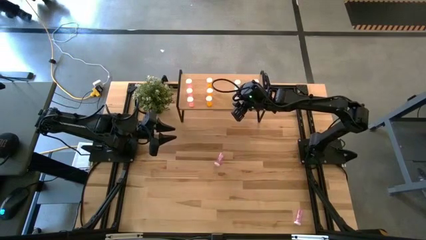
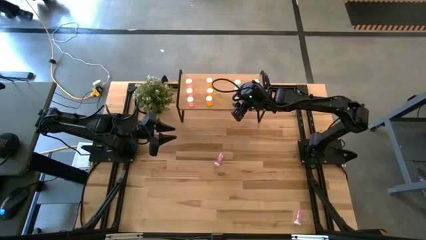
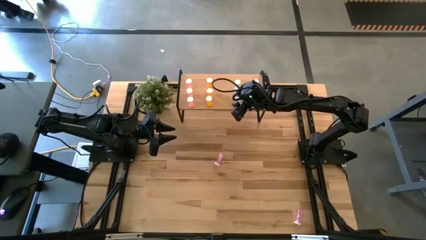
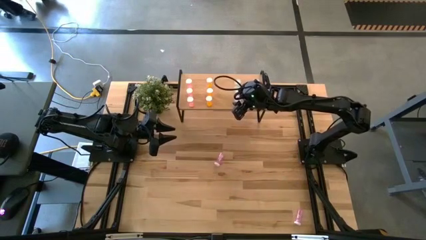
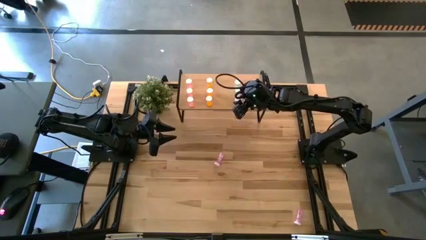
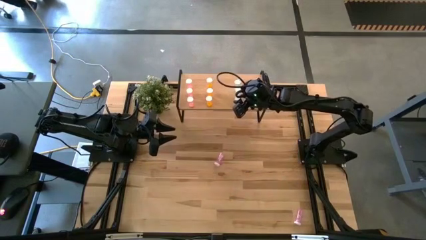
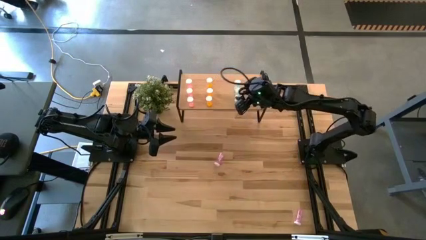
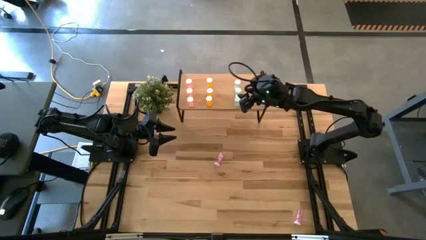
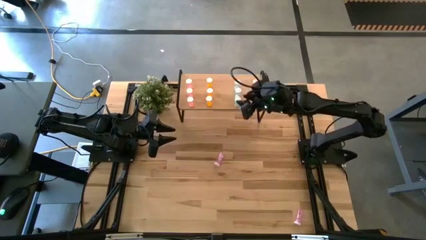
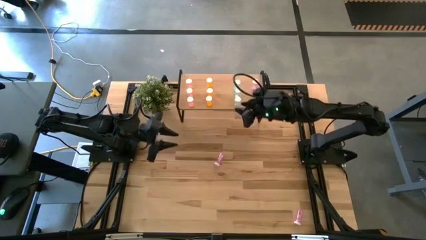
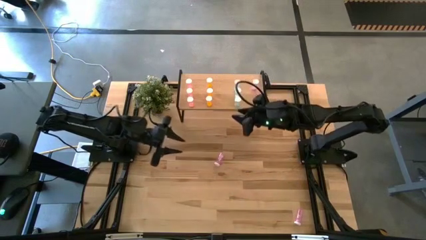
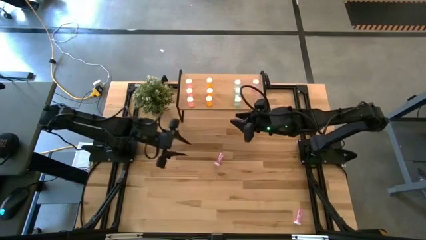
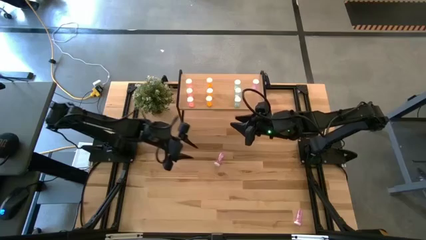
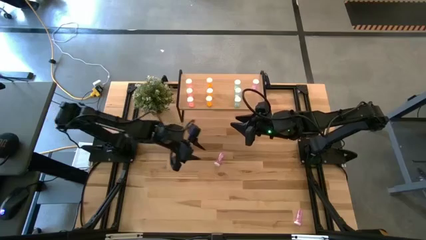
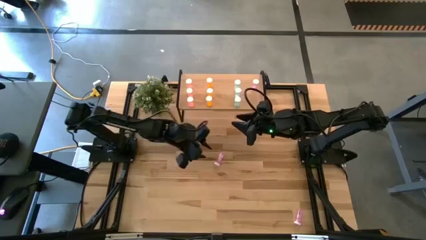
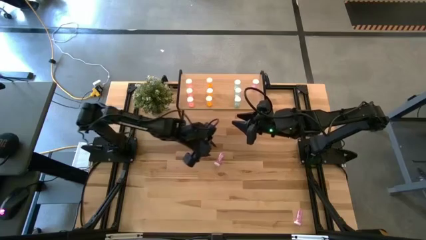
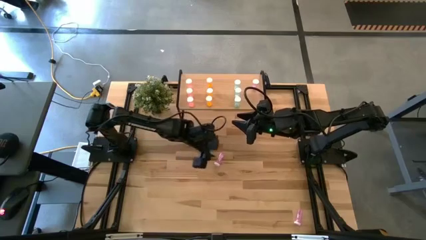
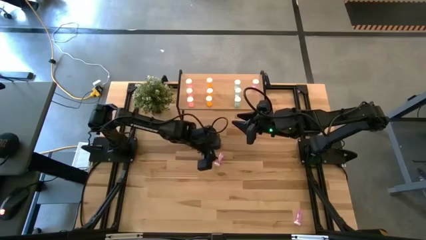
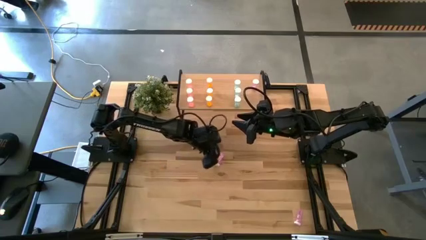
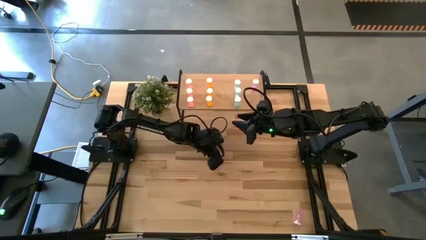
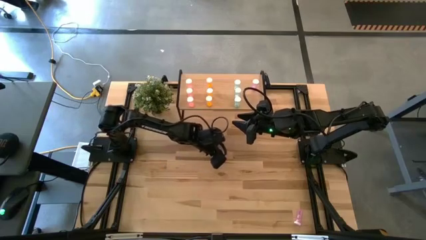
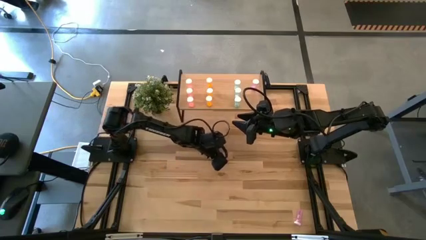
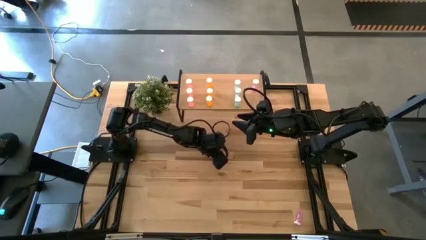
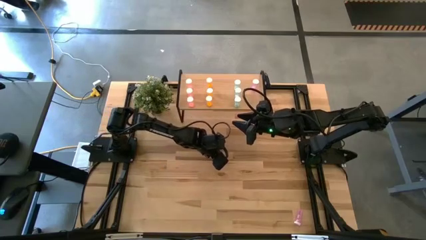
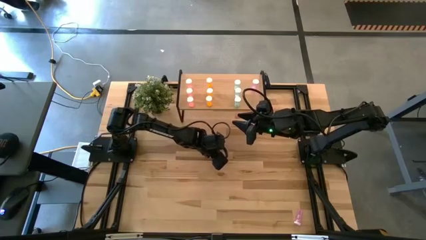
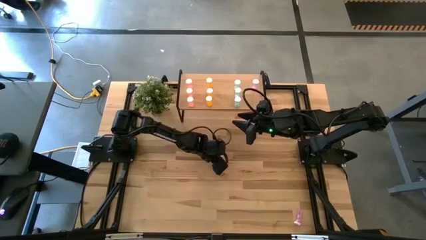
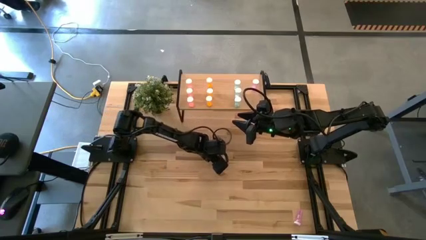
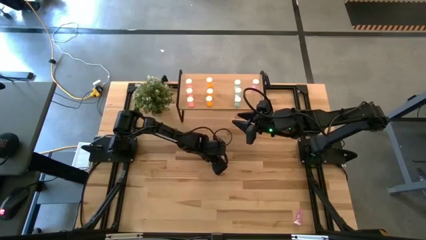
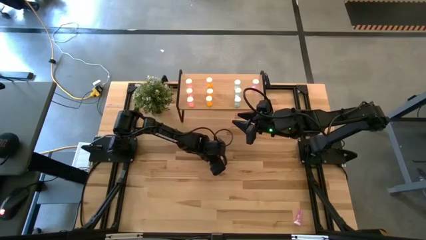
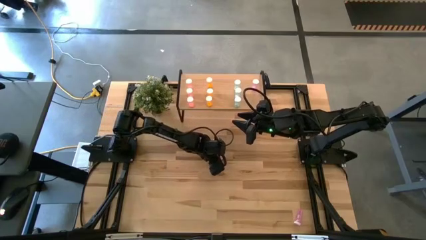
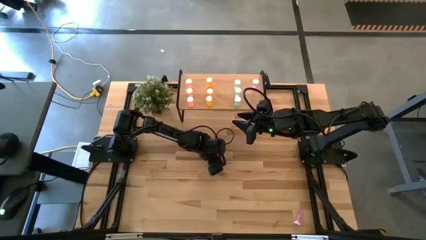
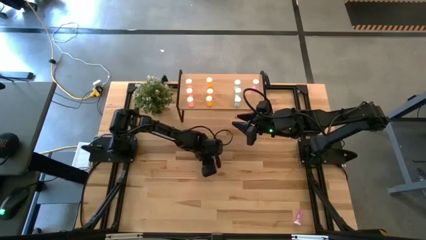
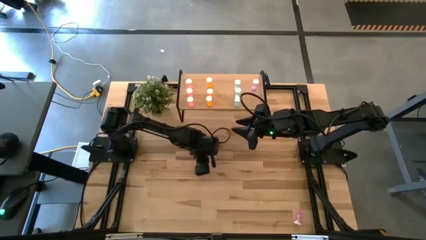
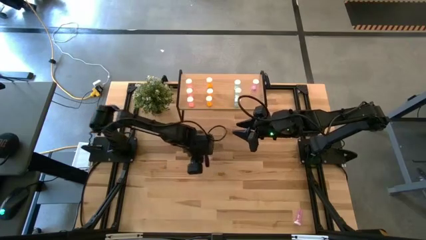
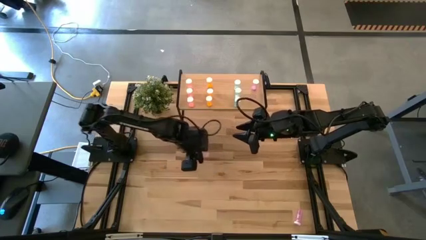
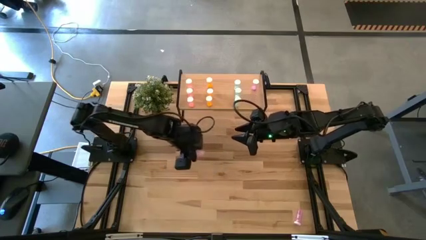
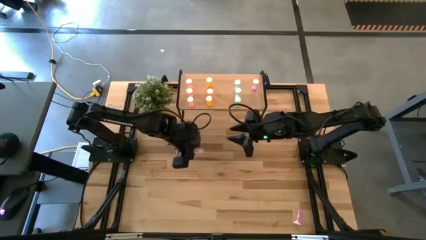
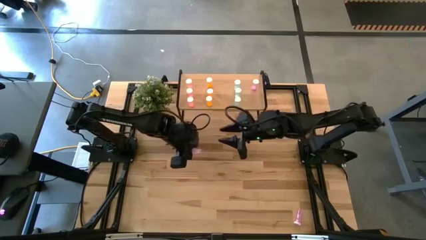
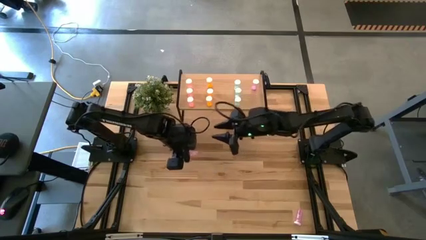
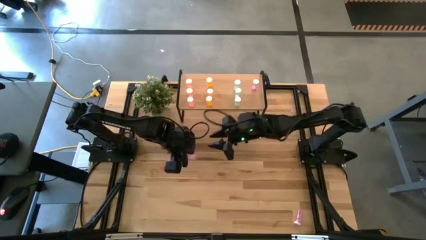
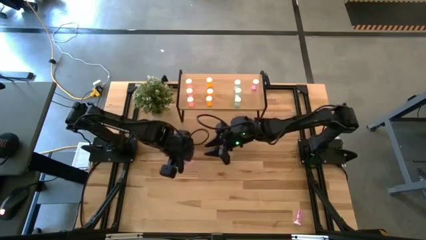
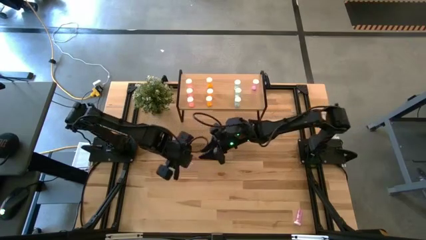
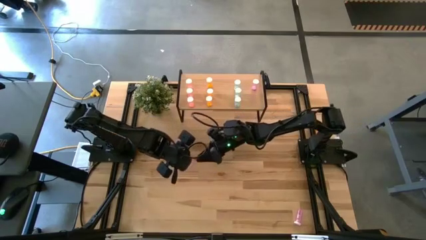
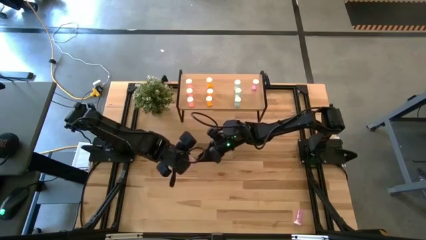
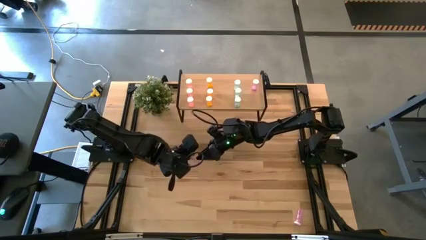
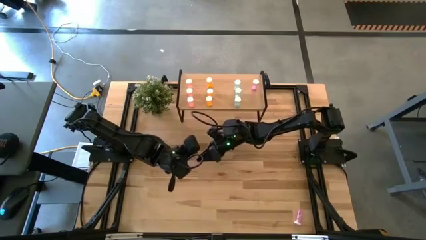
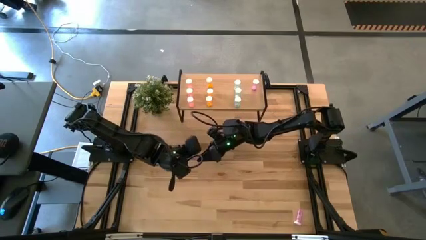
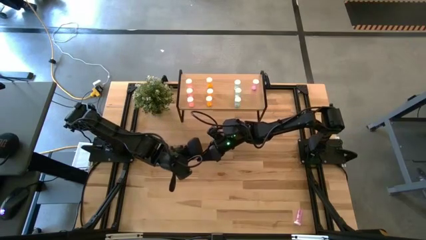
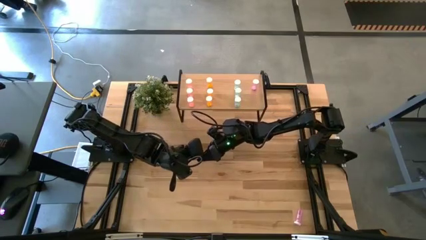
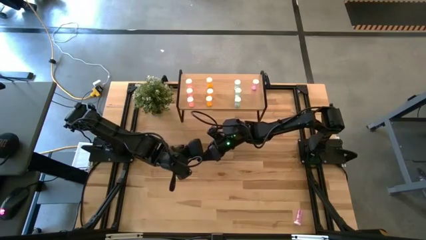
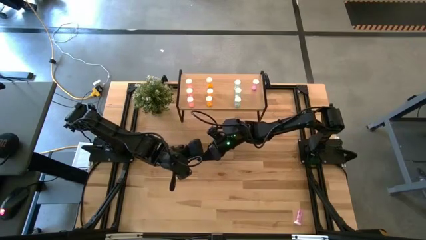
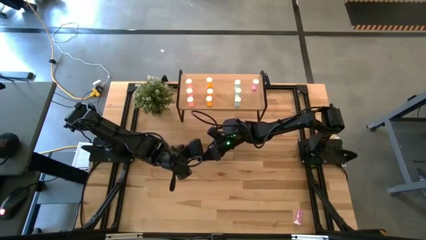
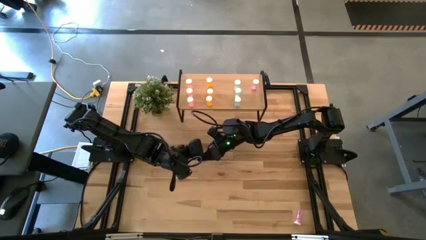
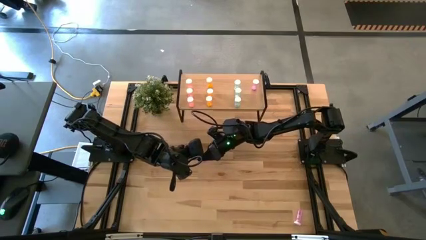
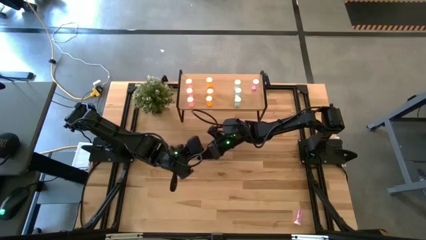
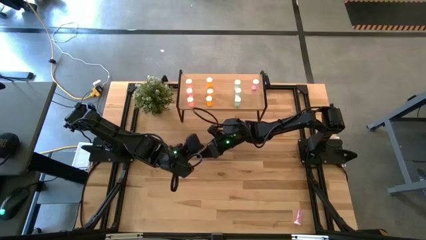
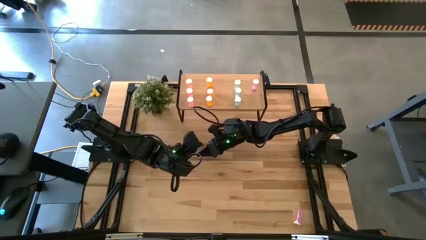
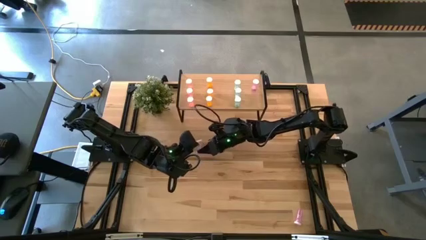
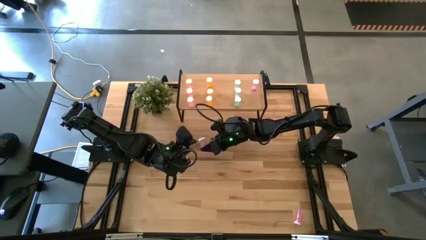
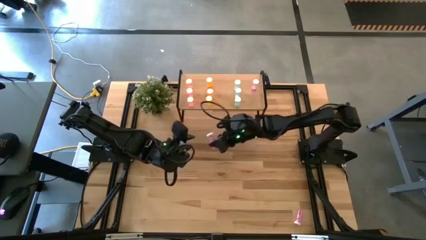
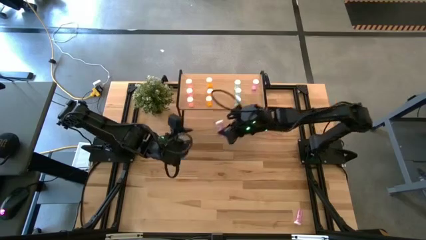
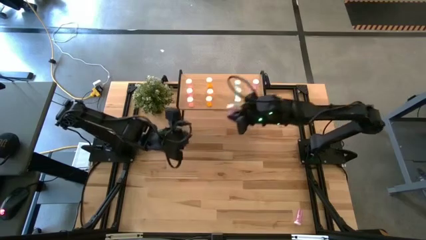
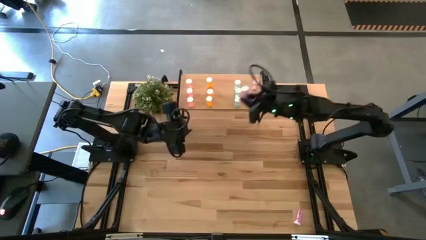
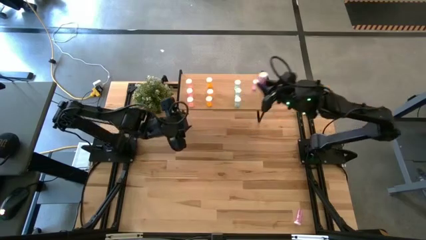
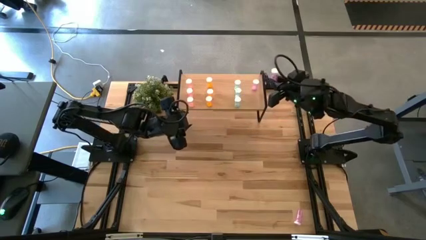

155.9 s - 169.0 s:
Task: Pick and place medicine bottles onto shelf by color
Put the top violet pill bottle on the shelf aligned with the other violet pill bottle
